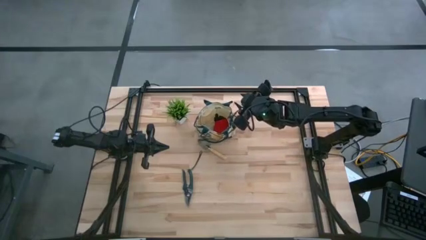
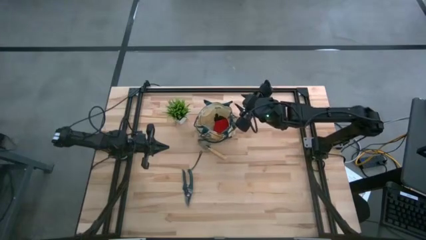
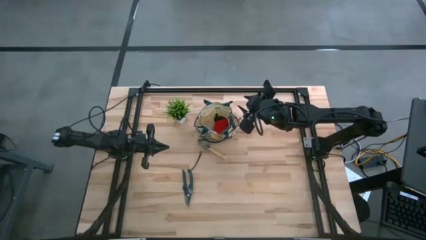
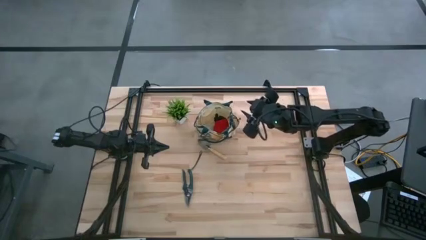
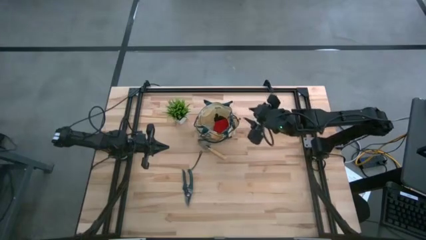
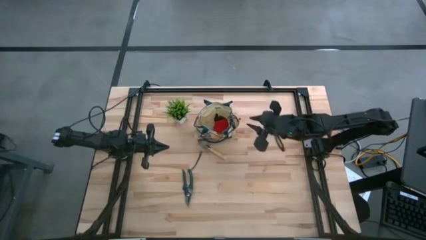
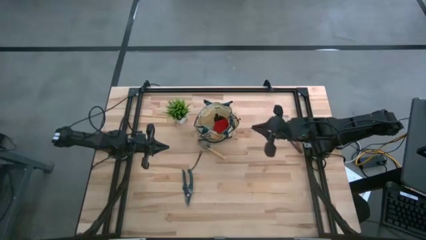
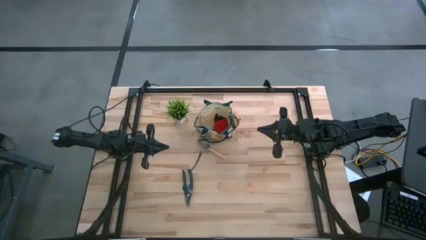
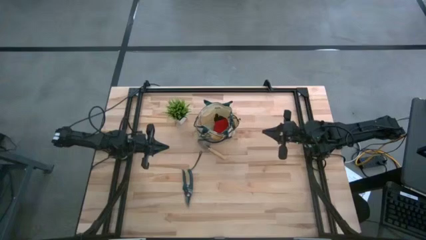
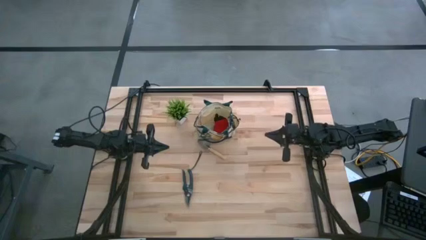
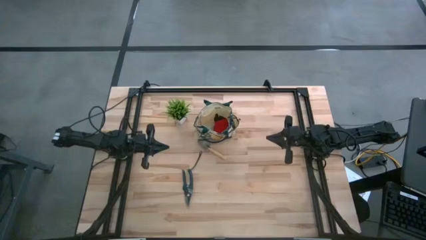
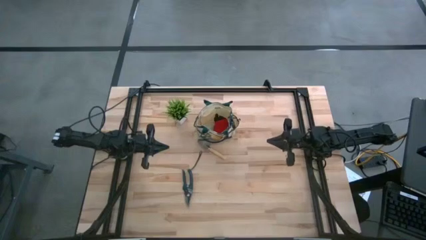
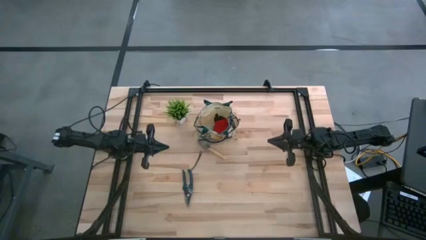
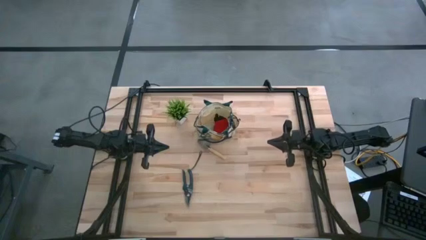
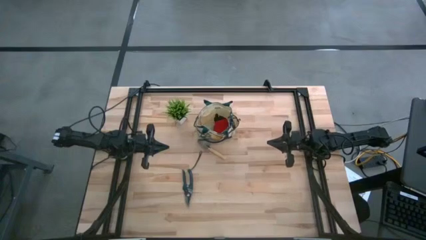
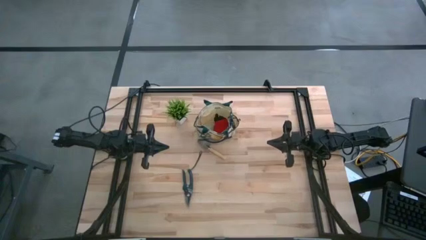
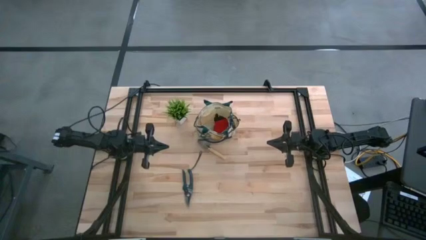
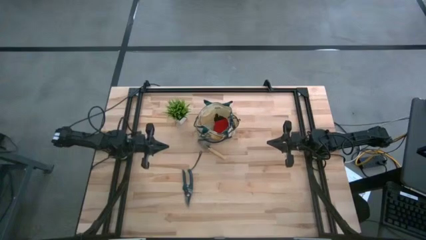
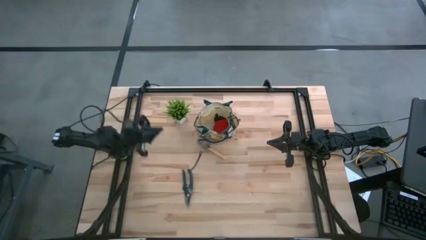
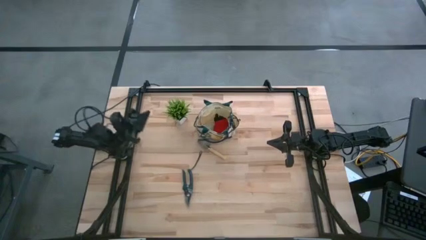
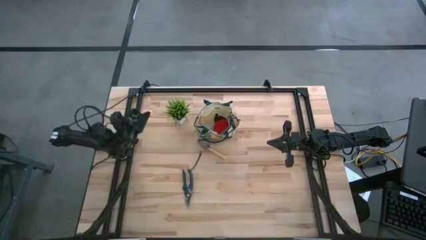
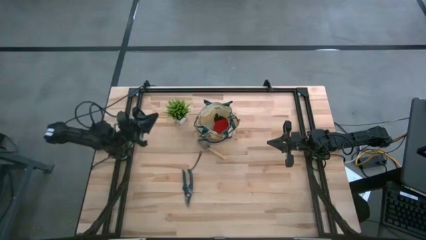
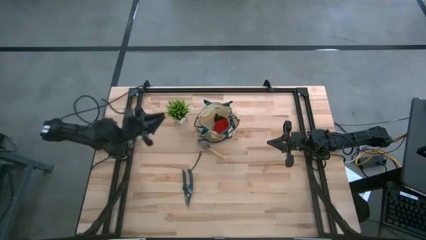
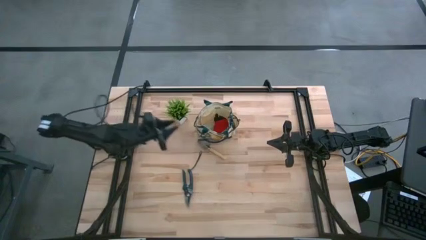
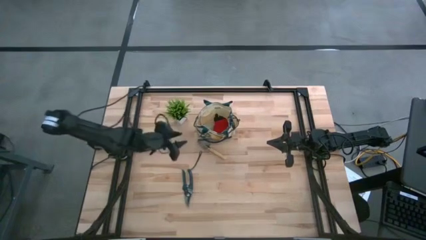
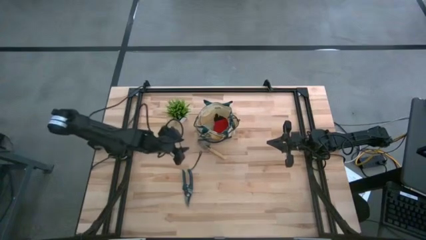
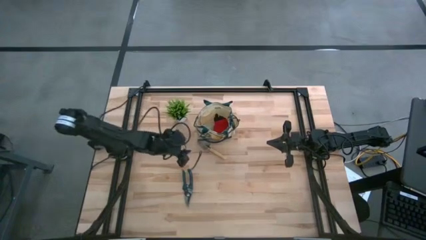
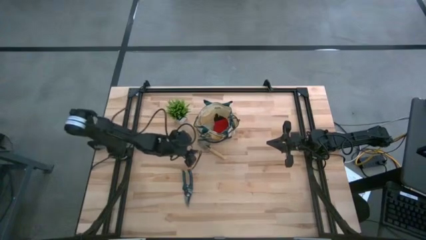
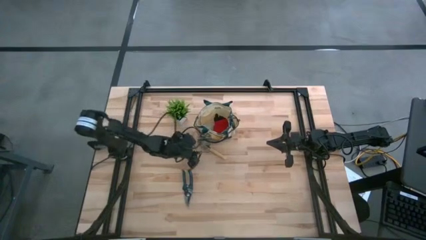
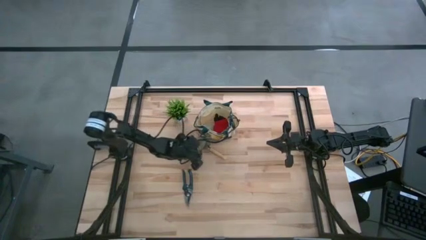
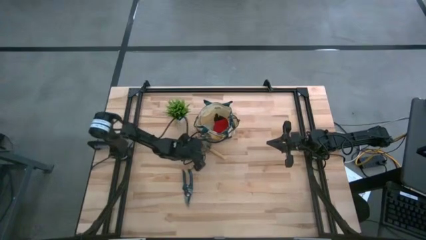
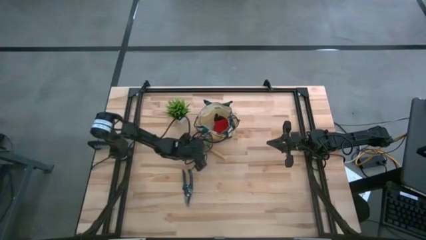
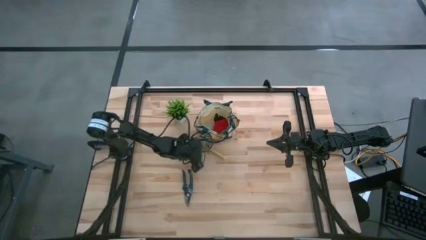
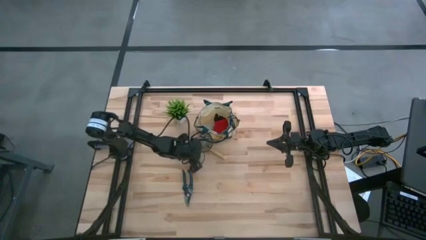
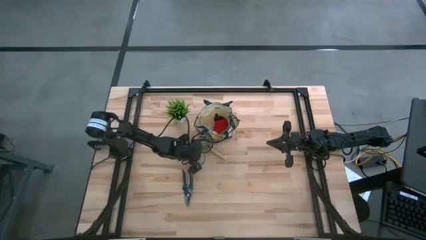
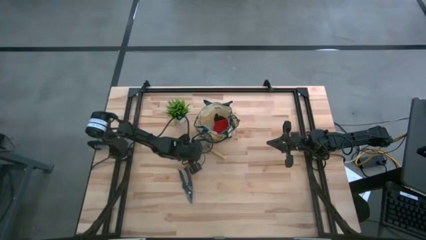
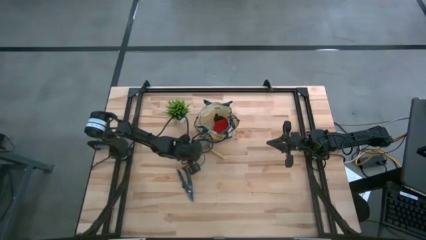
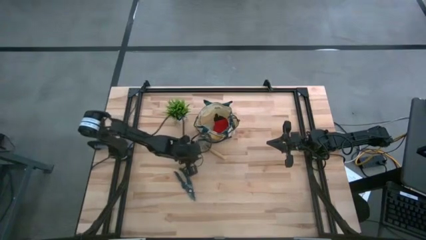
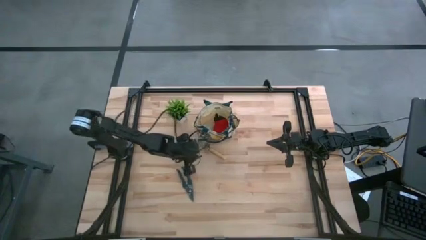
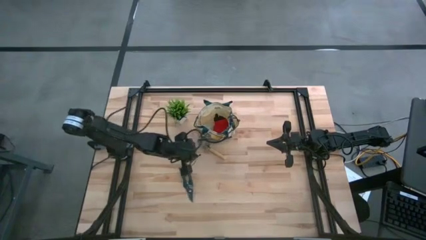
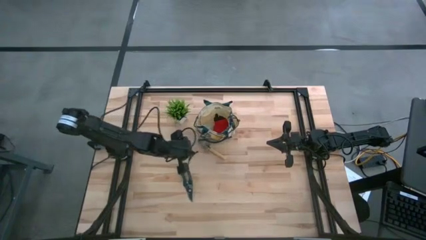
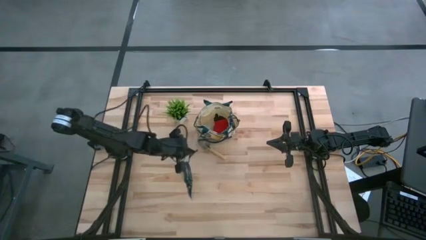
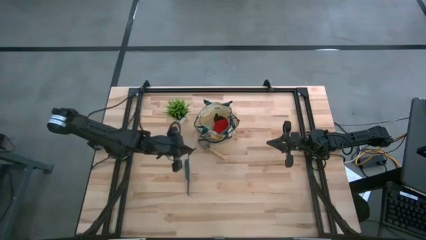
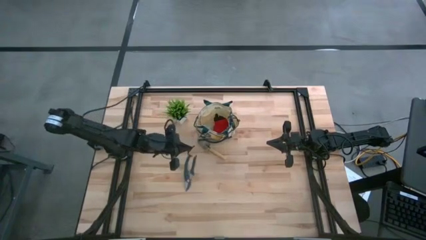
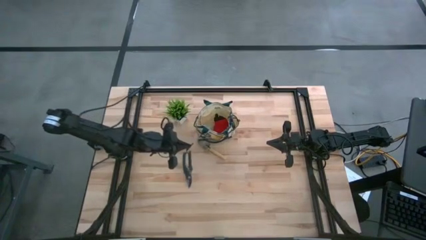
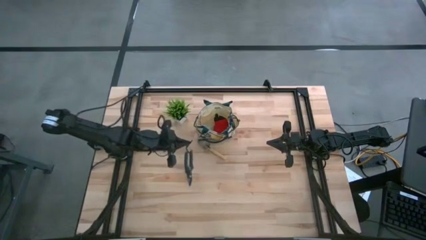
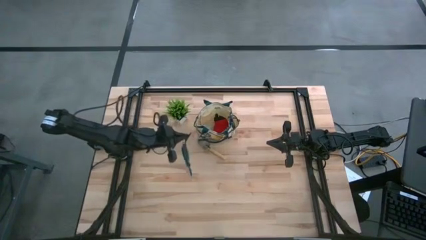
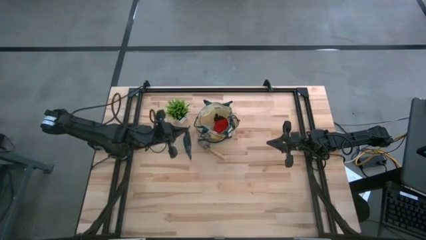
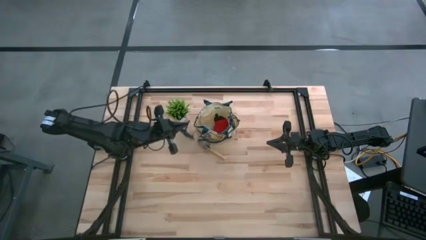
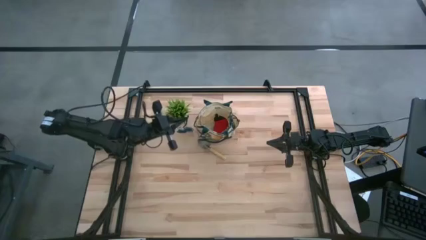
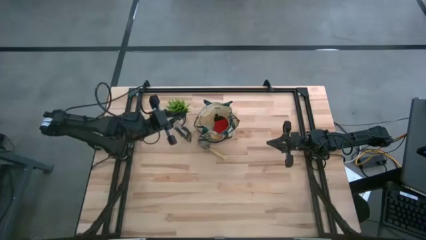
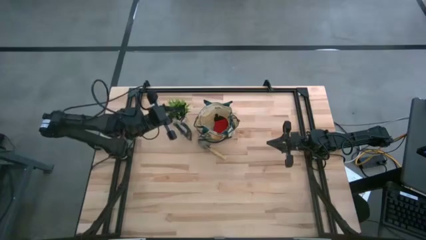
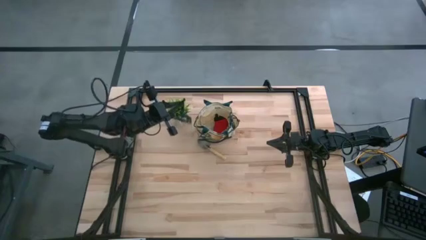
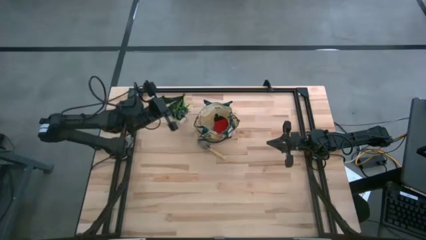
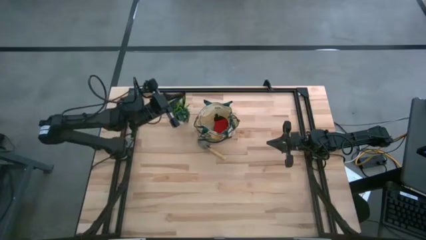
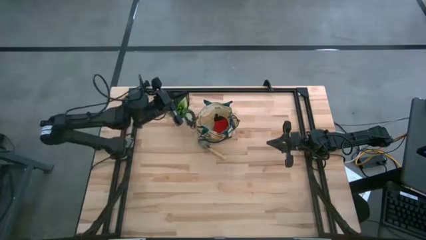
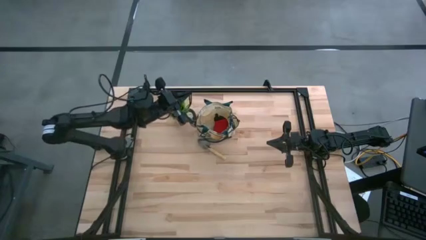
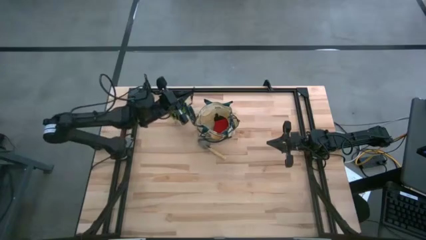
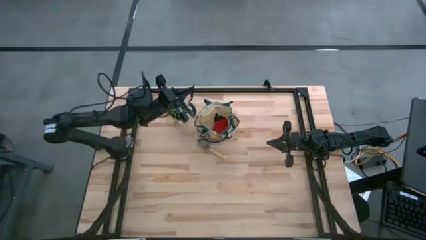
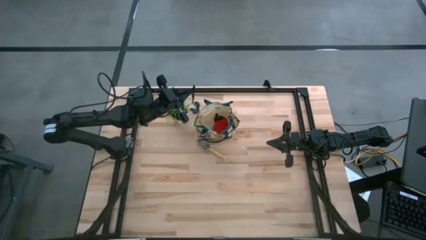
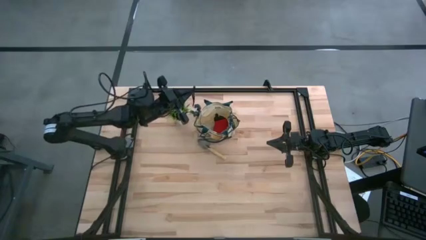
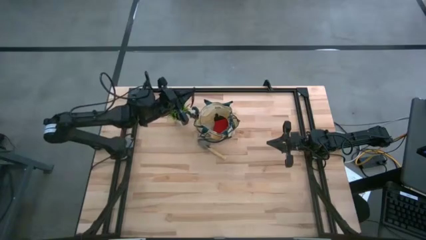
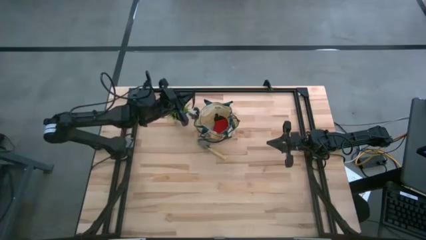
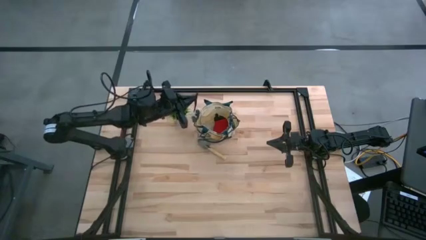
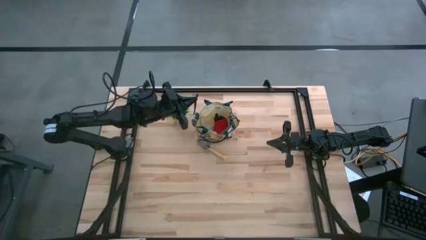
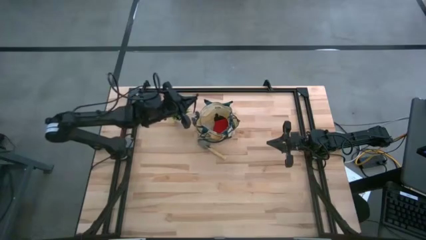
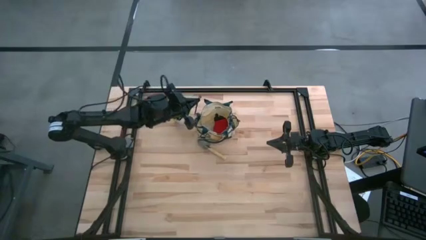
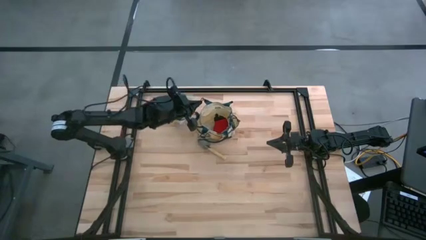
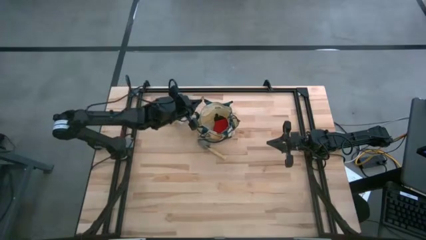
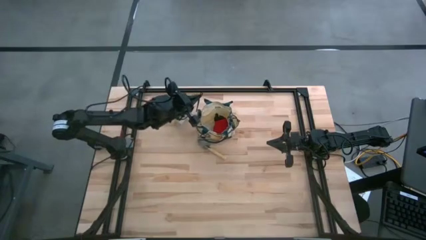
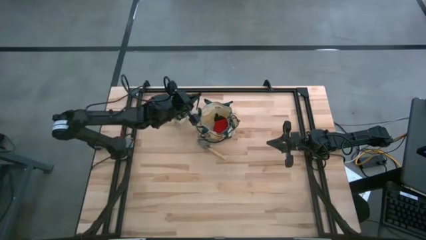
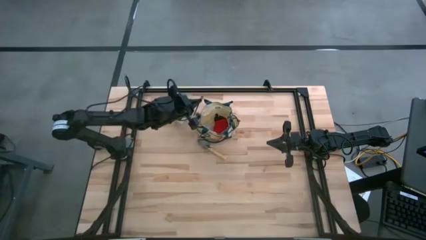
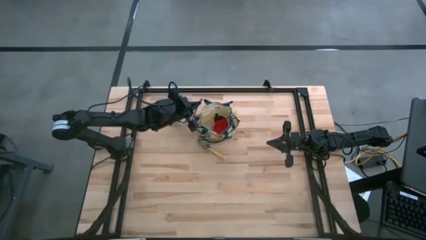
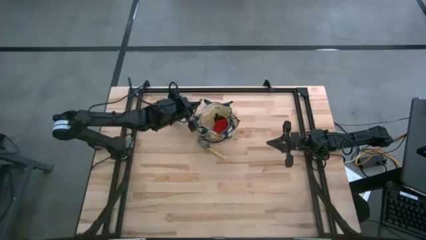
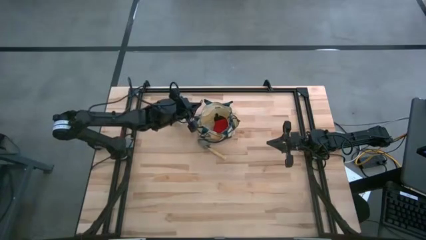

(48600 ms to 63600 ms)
Task: Pick & Place Garden tools in Gardening bag
Put the green shear scissors into the white gardening bag

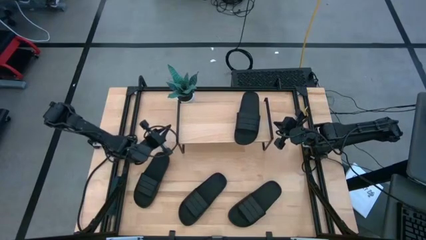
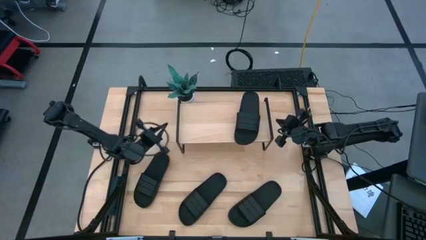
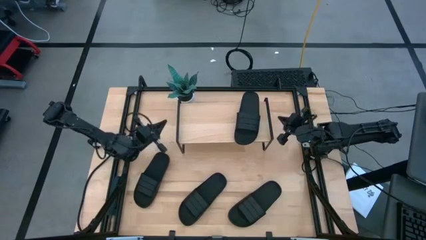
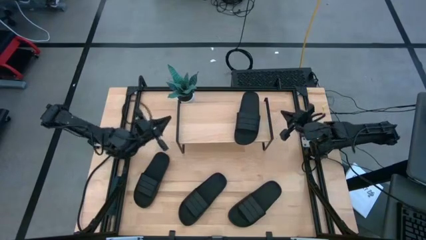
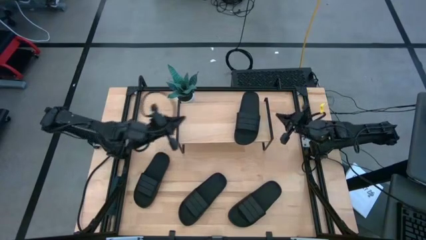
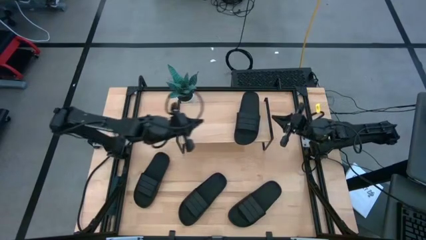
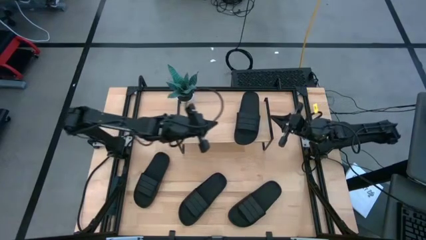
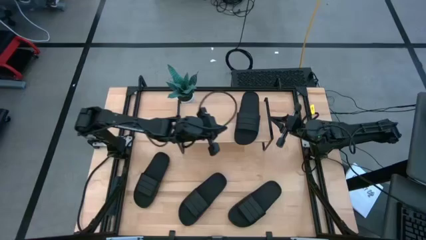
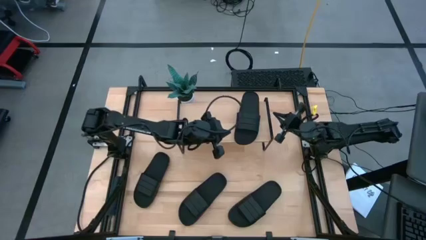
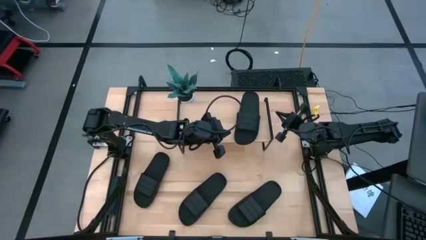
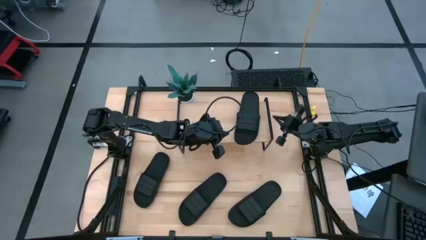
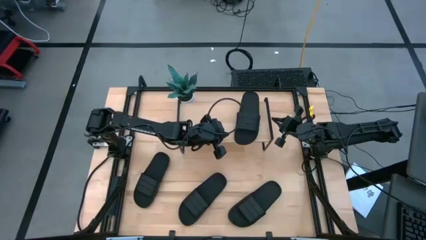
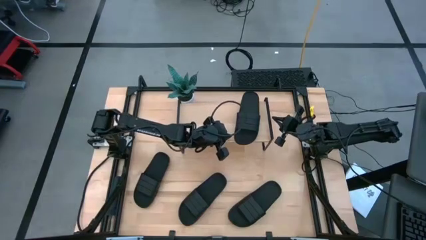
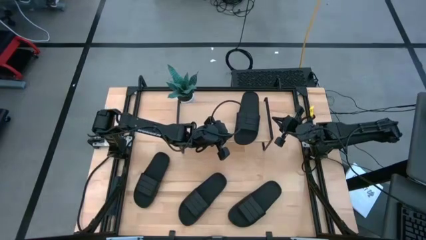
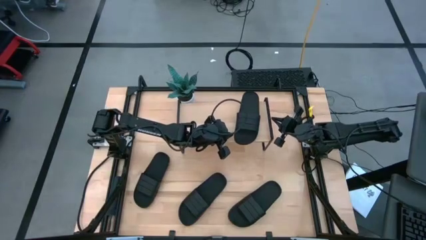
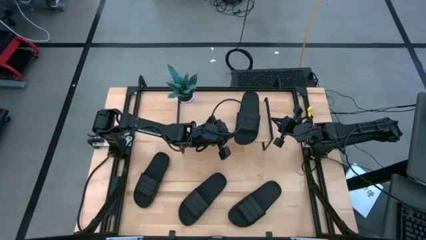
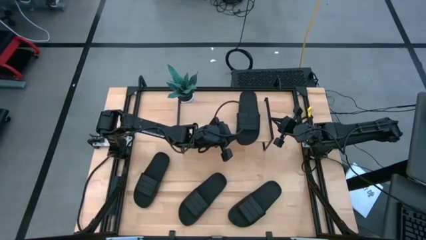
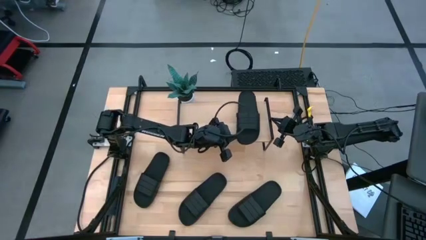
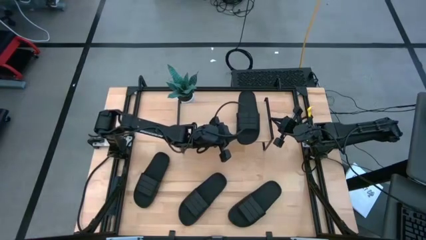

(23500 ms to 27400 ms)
Task: Pick and place slides into the shelf
Adjust the slide on the shelf
